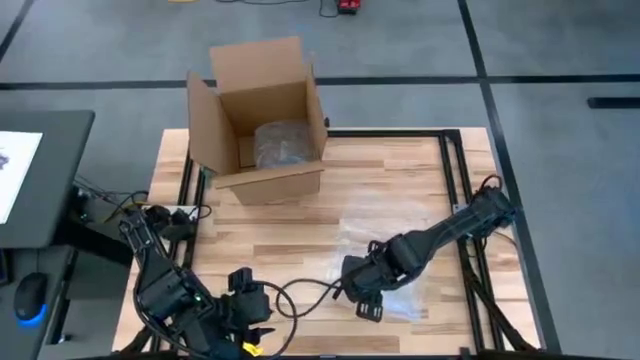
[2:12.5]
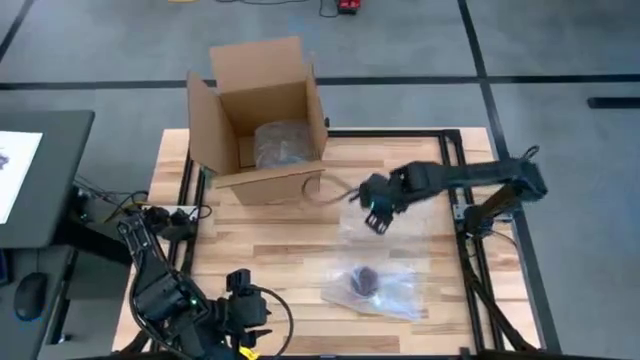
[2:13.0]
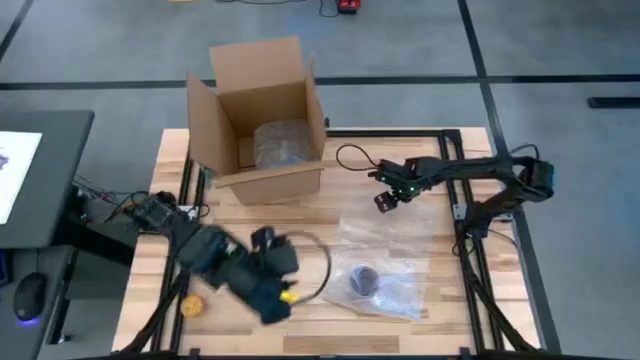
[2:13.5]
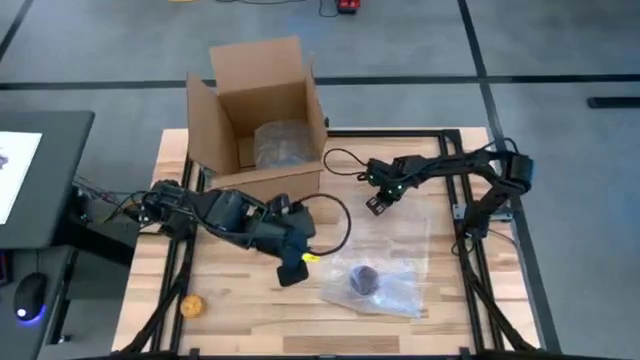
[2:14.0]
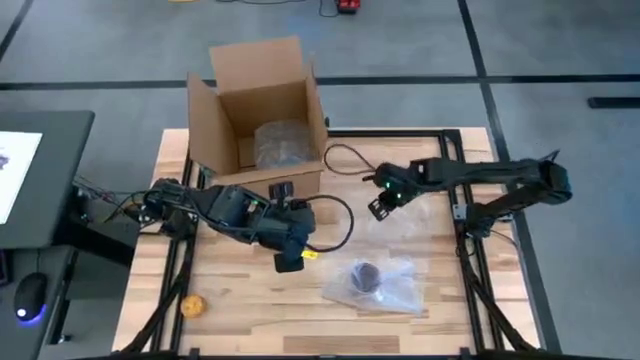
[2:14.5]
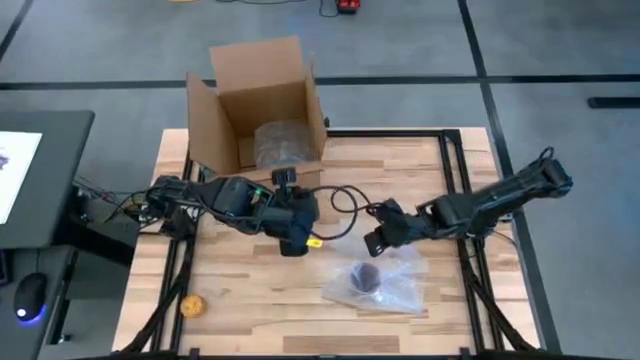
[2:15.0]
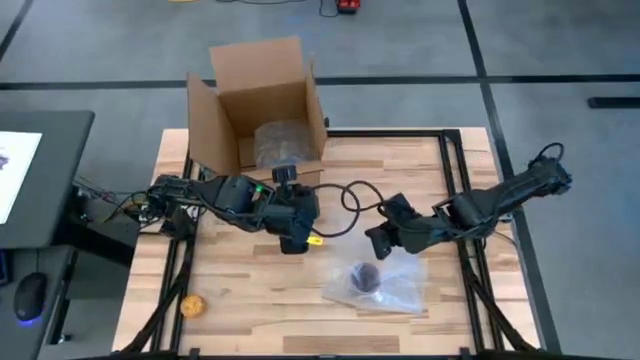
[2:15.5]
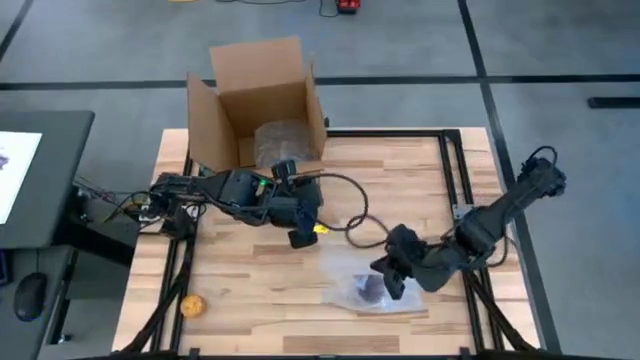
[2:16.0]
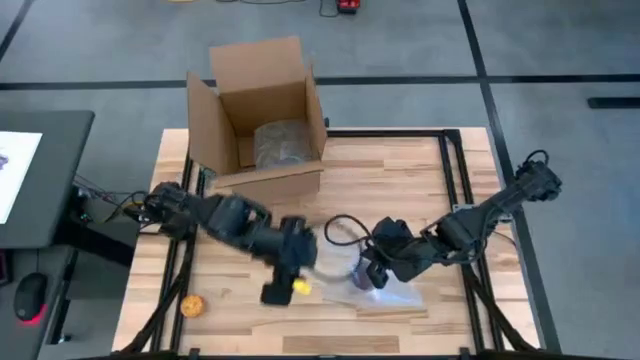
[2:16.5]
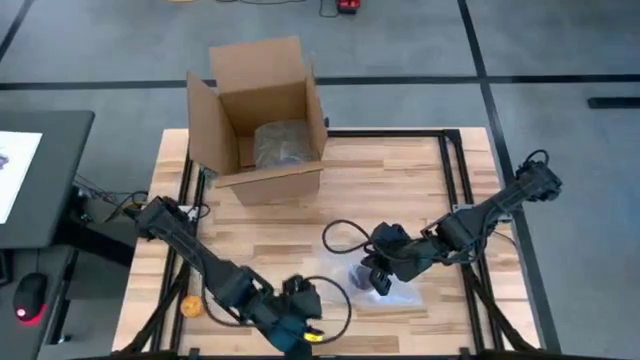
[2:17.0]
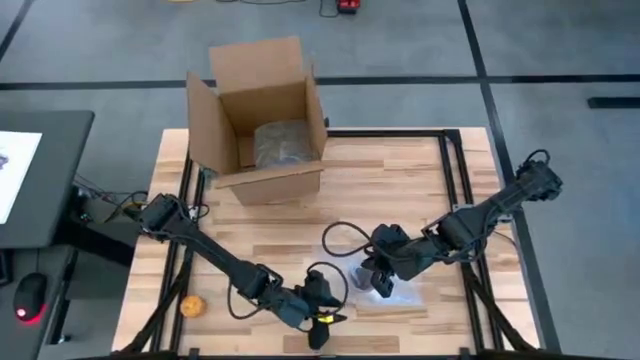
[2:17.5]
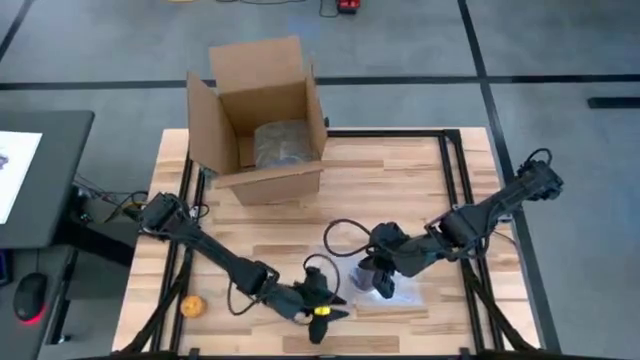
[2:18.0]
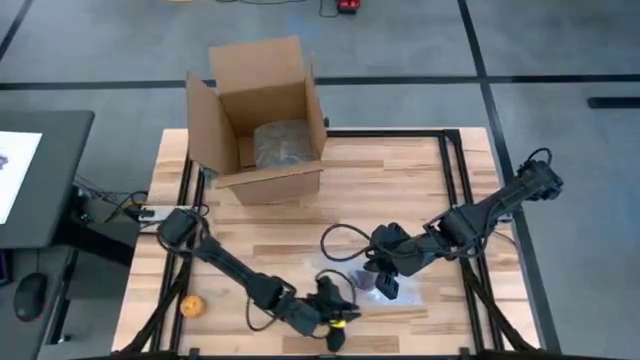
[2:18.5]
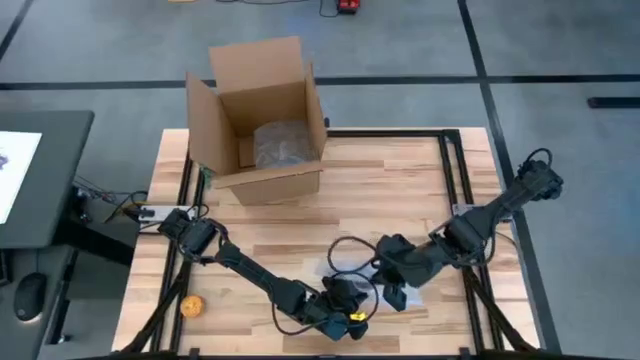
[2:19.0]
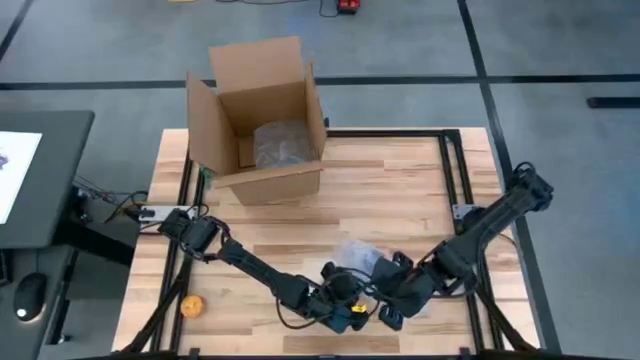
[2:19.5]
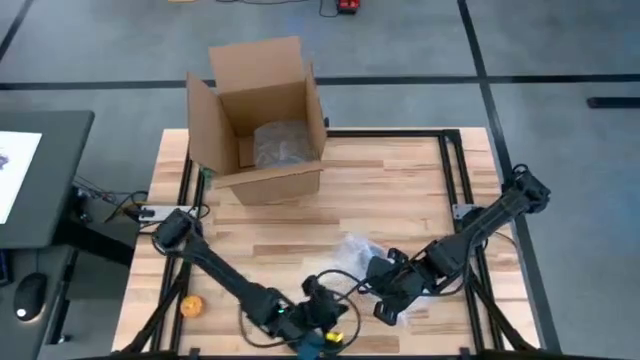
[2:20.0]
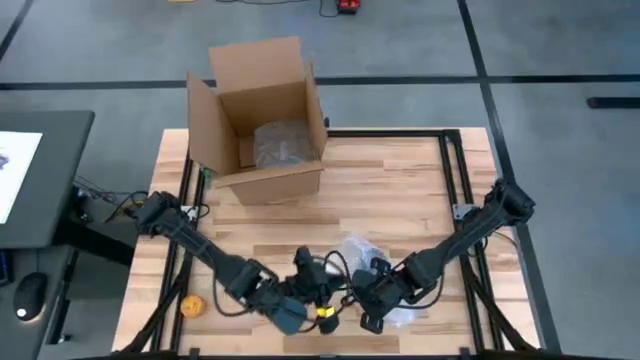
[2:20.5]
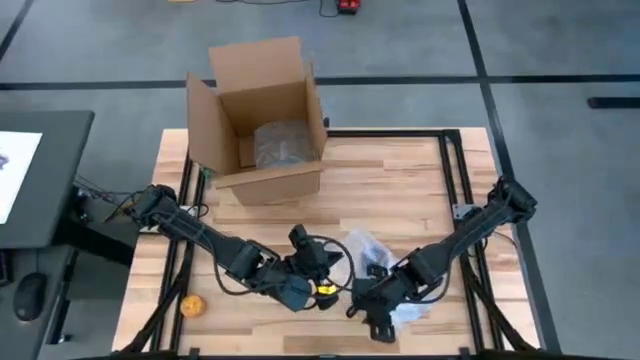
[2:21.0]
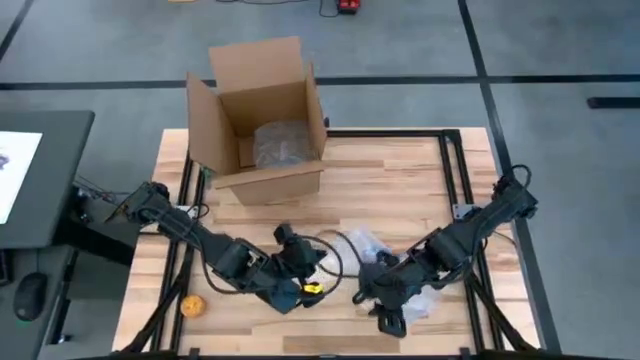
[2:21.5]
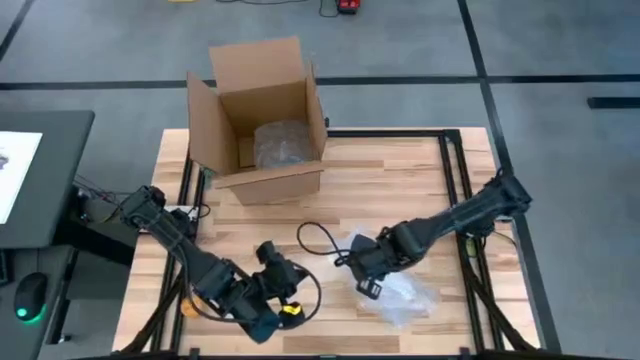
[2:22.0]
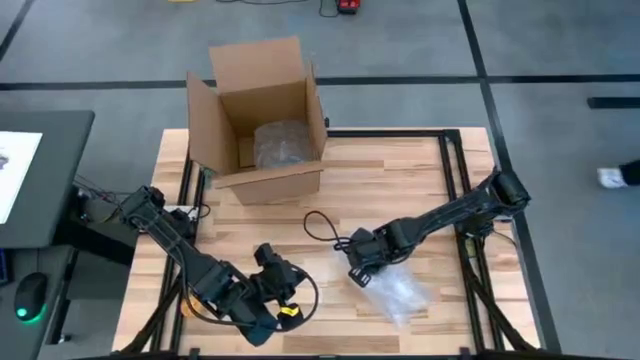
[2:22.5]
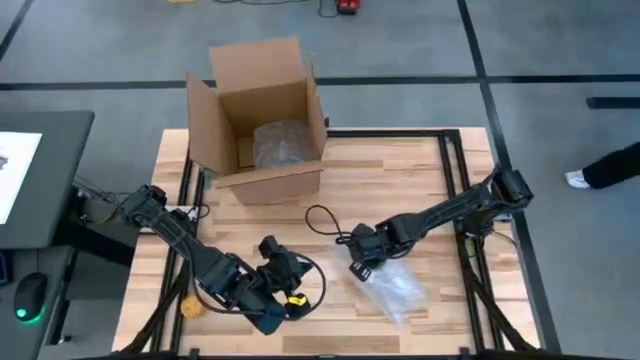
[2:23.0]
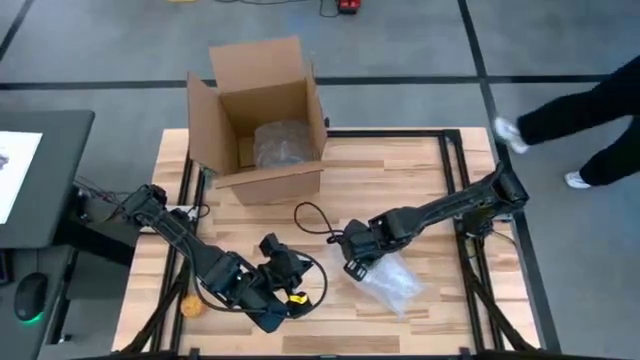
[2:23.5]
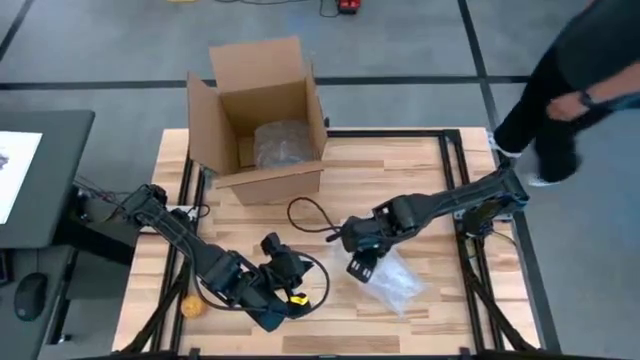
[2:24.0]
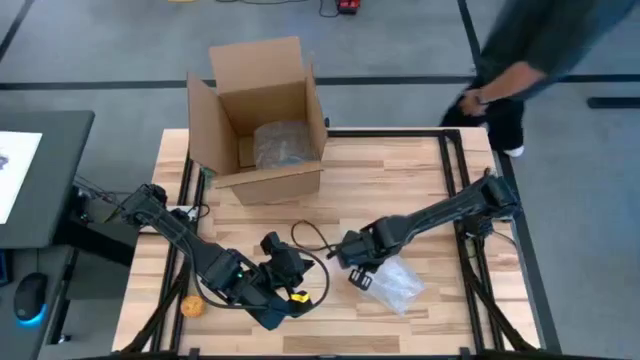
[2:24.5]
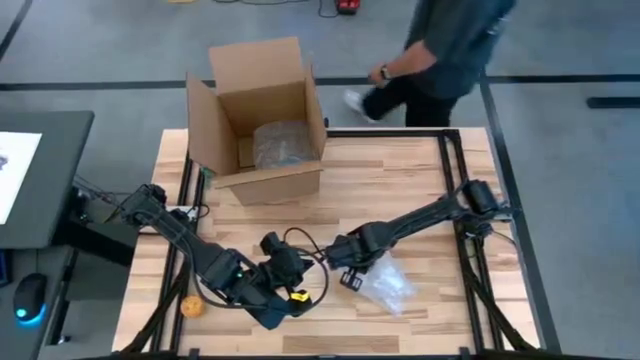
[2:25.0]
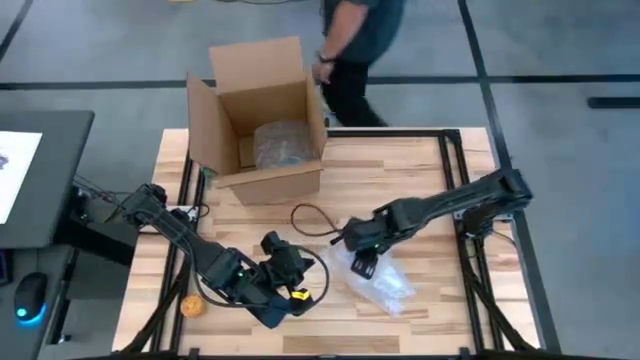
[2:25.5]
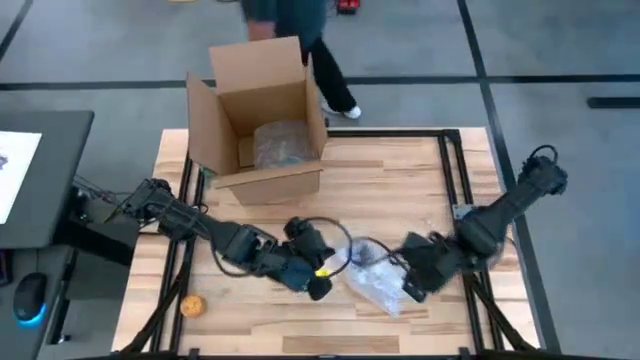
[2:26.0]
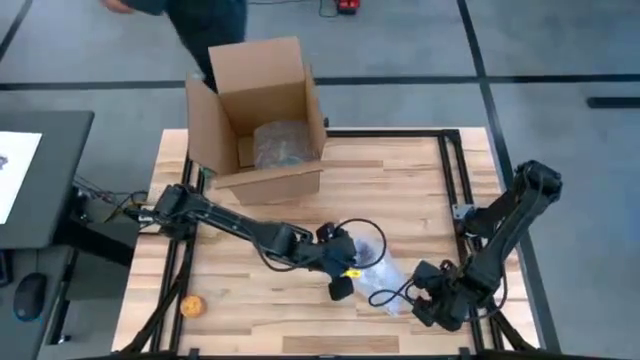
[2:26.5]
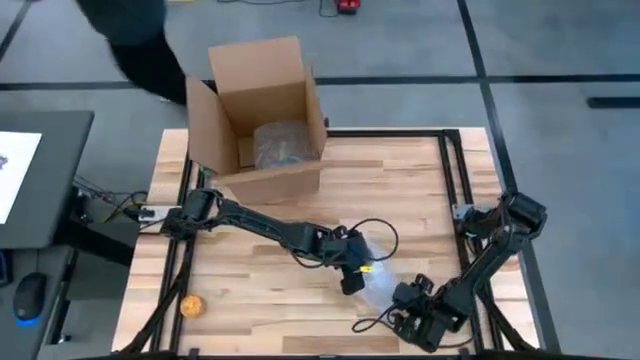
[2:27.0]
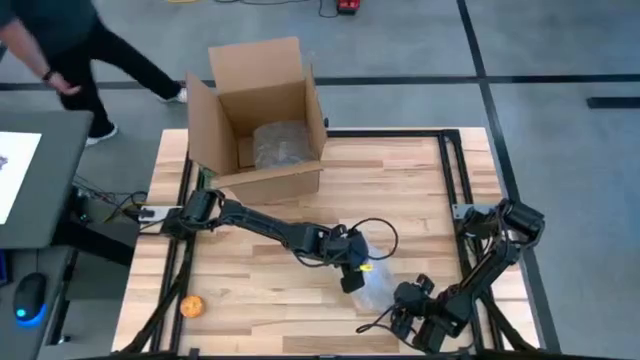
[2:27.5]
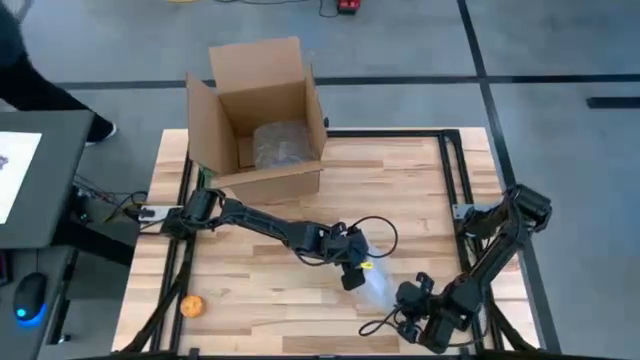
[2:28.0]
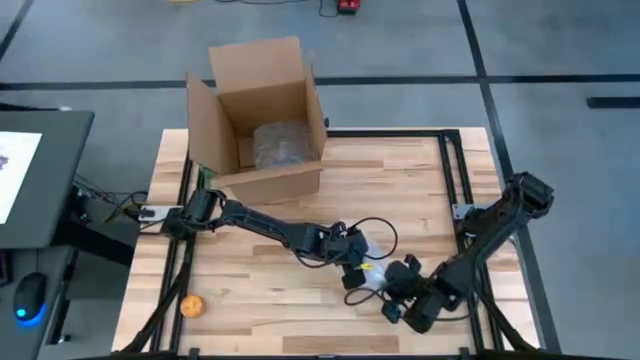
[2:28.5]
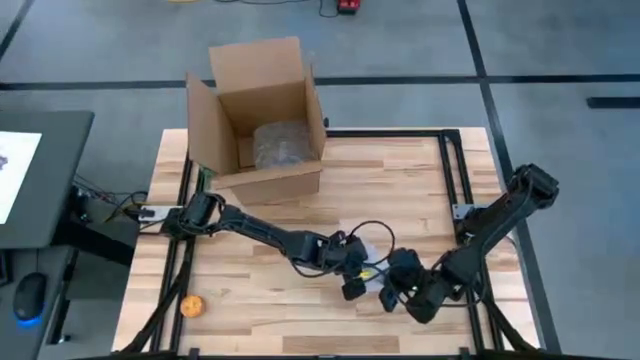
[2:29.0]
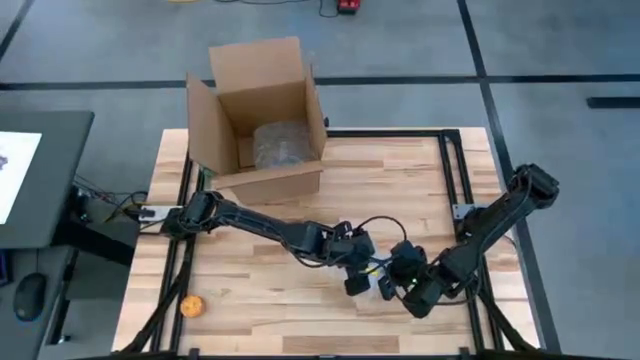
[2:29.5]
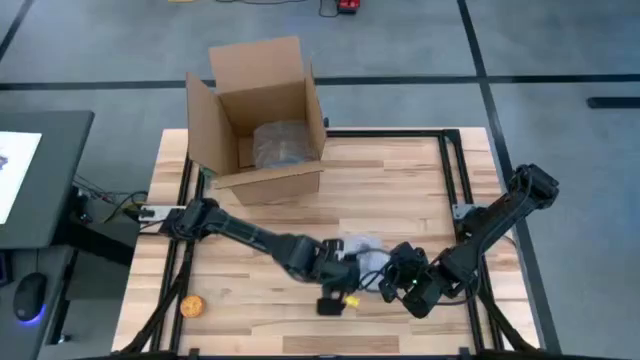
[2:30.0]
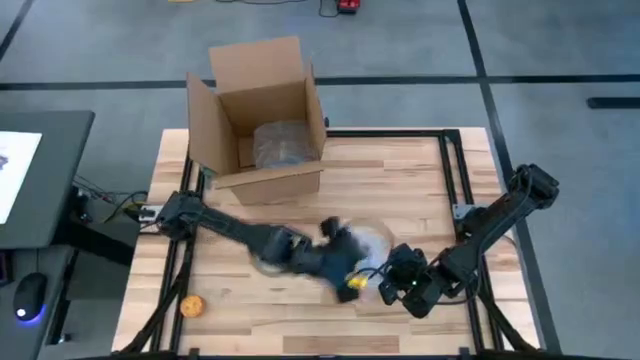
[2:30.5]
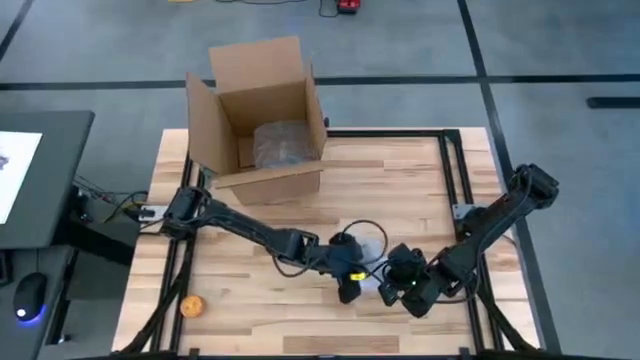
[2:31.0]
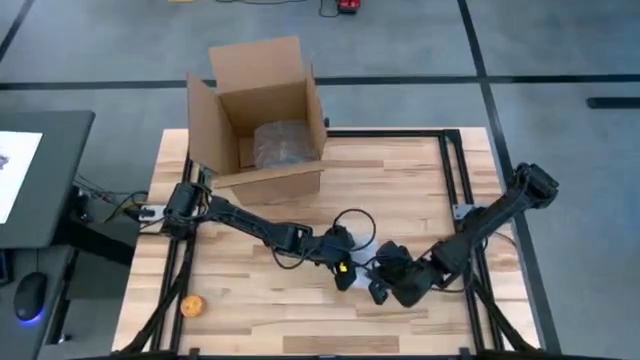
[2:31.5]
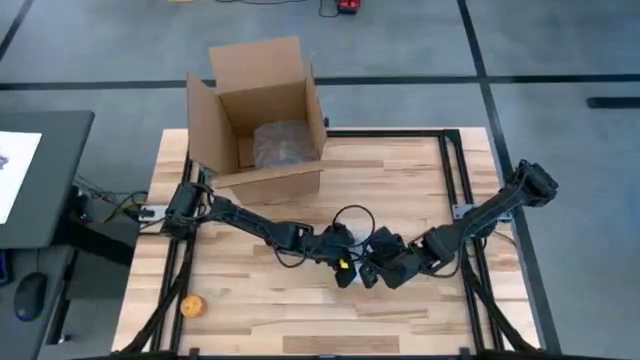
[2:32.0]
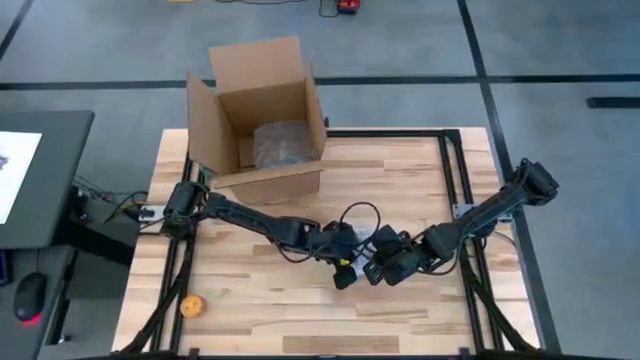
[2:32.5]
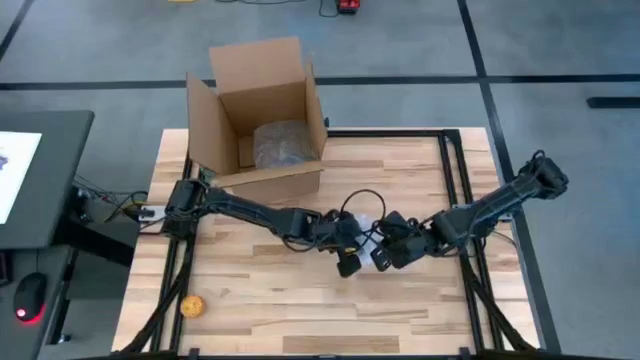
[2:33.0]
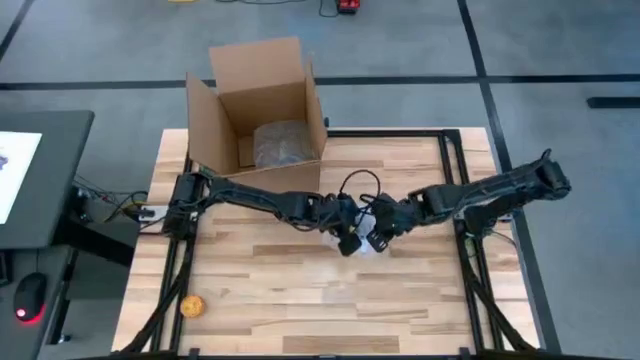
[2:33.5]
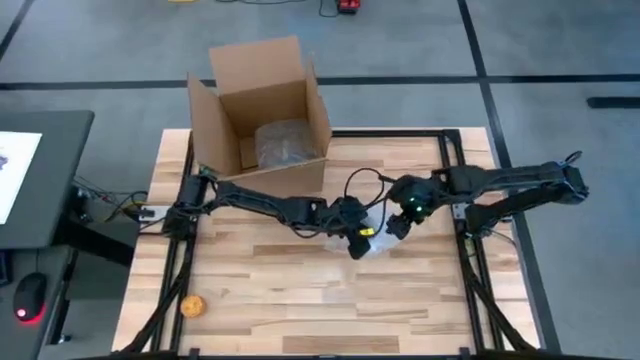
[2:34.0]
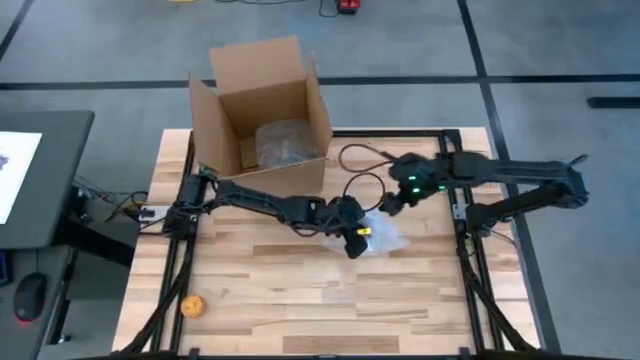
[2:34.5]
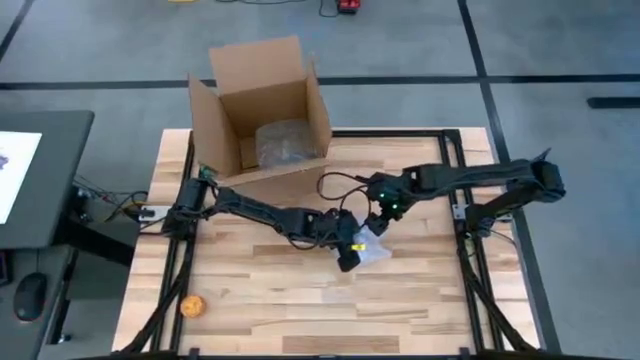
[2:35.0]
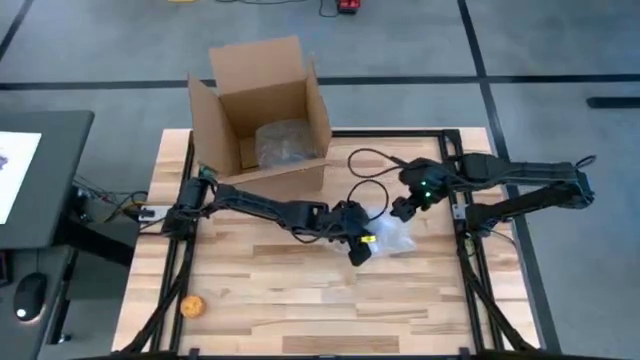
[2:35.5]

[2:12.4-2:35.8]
Task: wrap mug
Wrap the purple mug with the bubble wrap
